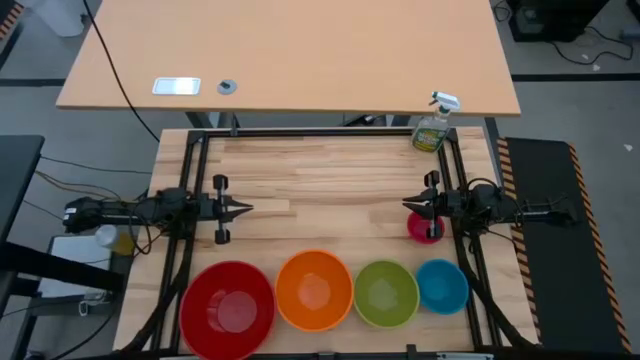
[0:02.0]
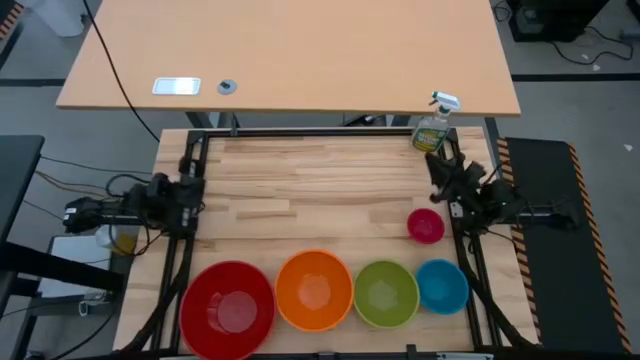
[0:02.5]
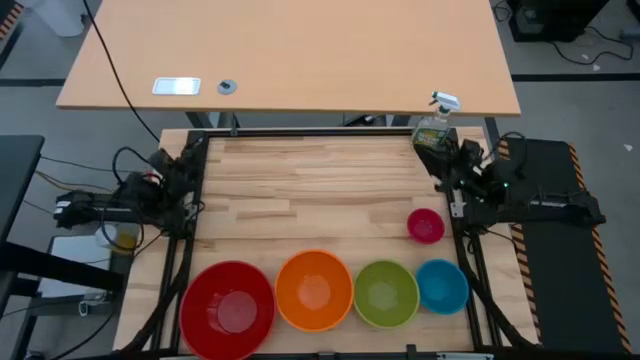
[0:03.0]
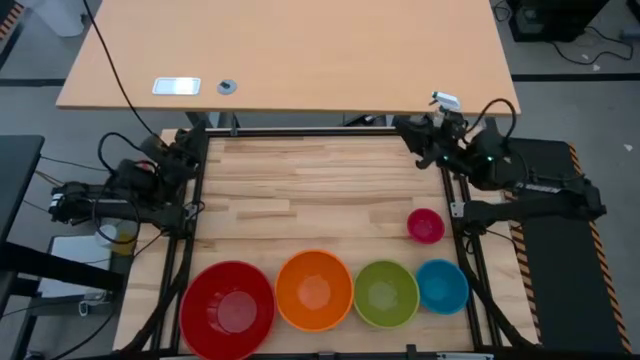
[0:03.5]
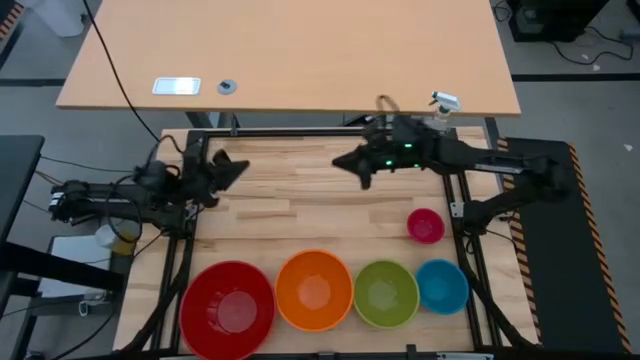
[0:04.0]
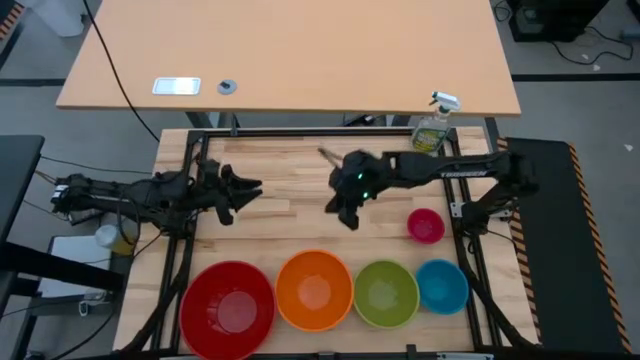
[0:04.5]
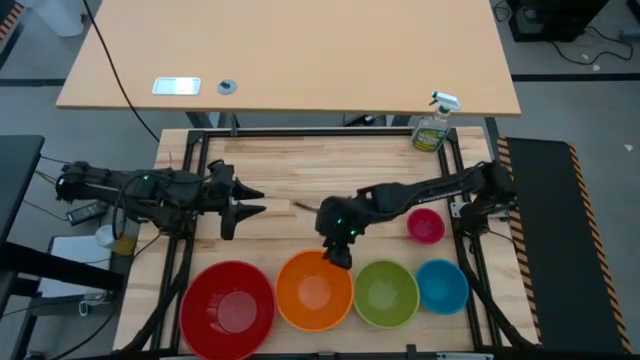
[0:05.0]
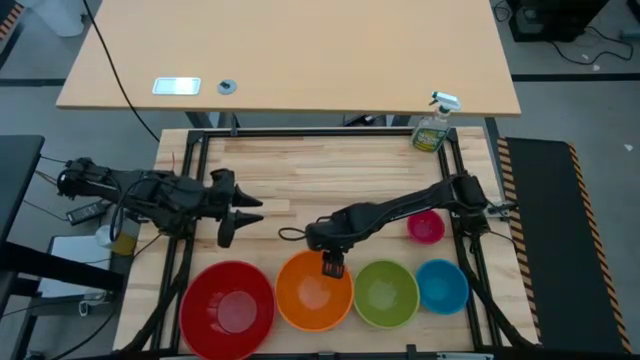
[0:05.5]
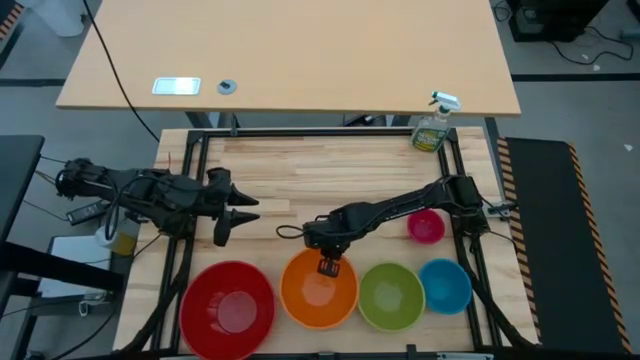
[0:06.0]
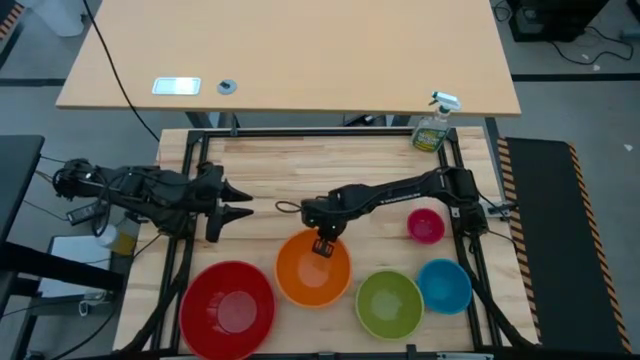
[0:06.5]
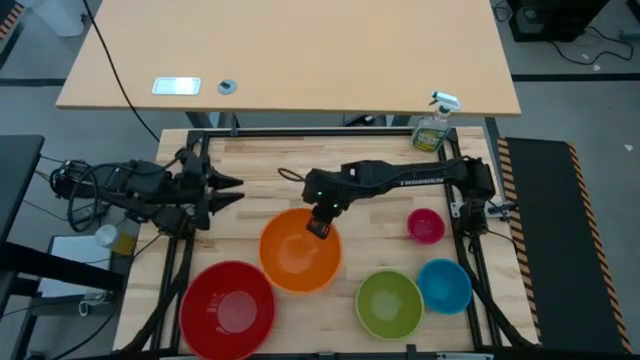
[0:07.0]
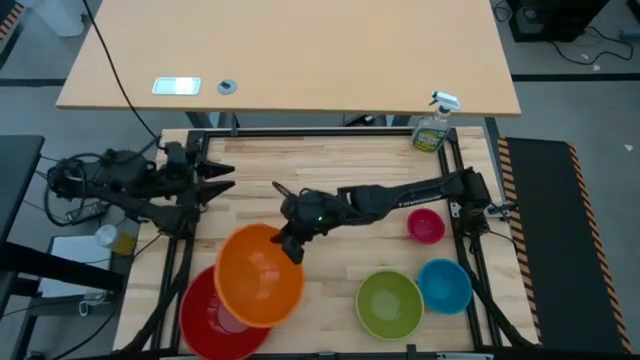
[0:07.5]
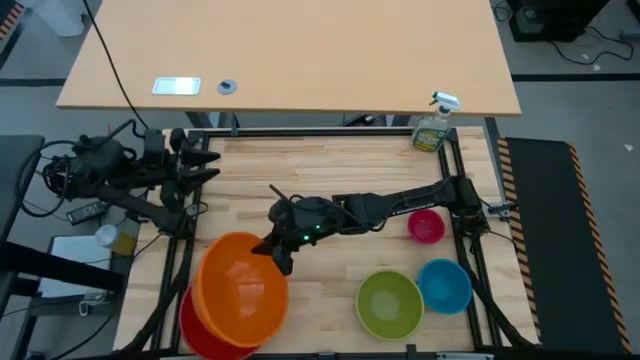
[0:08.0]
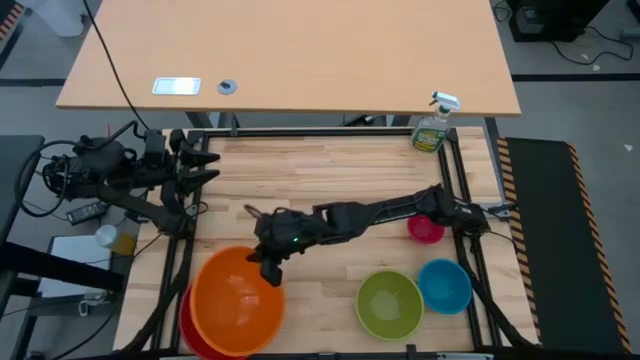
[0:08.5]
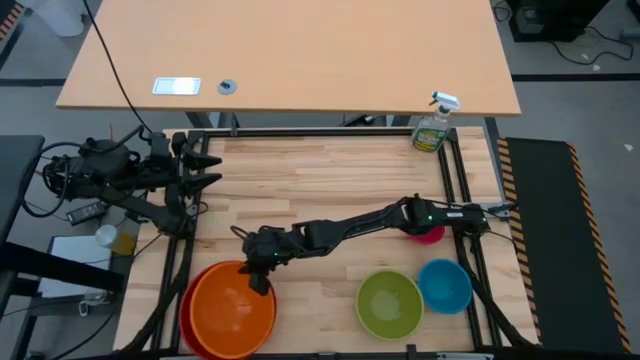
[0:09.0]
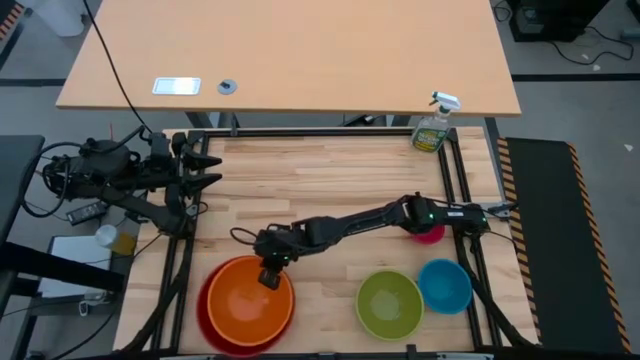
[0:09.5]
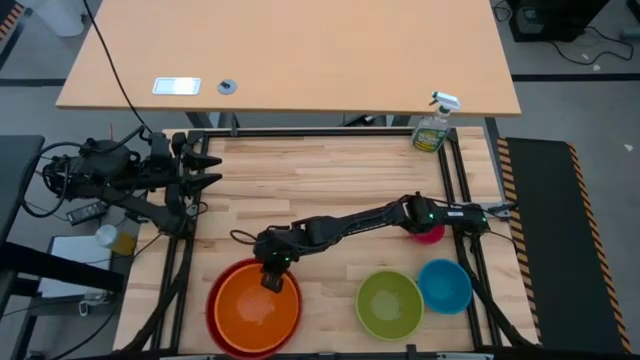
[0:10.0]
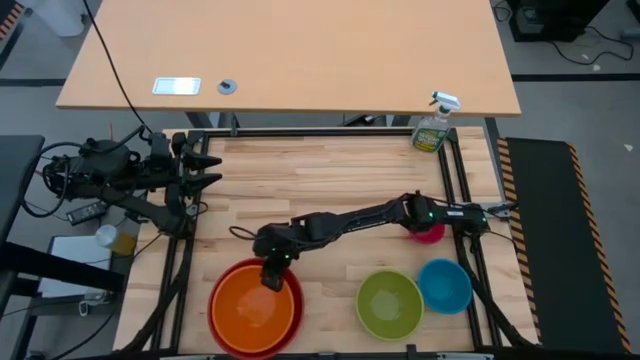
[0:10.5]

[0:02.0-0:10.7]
Stack the orange bowl on the red bowl

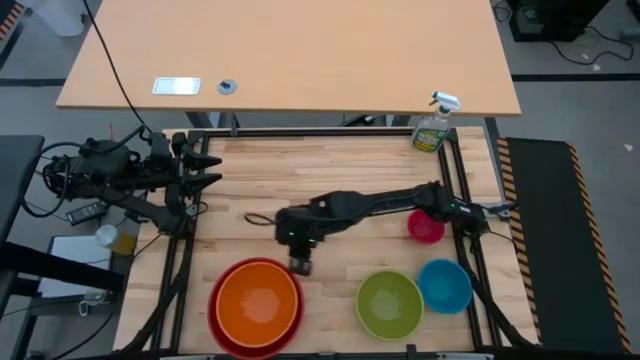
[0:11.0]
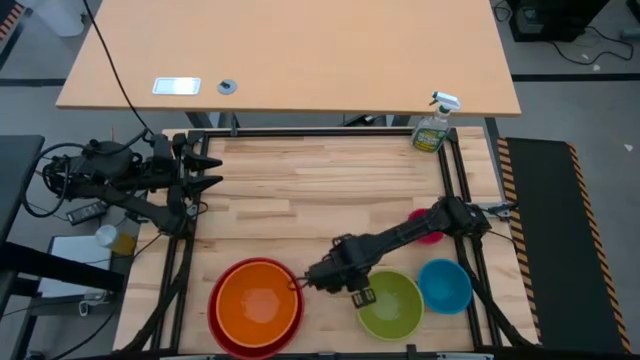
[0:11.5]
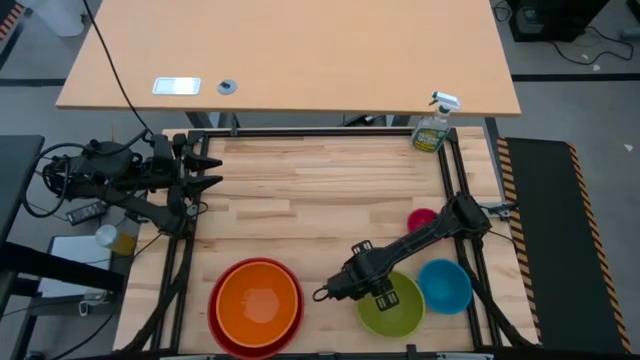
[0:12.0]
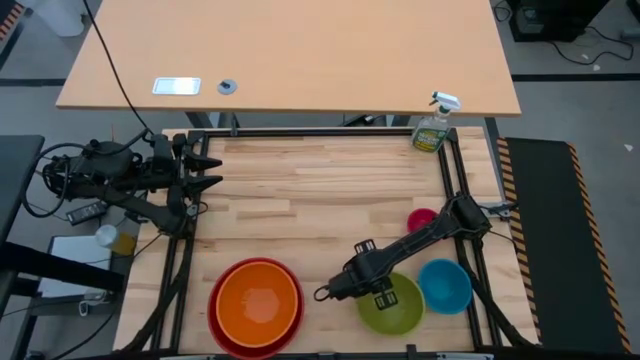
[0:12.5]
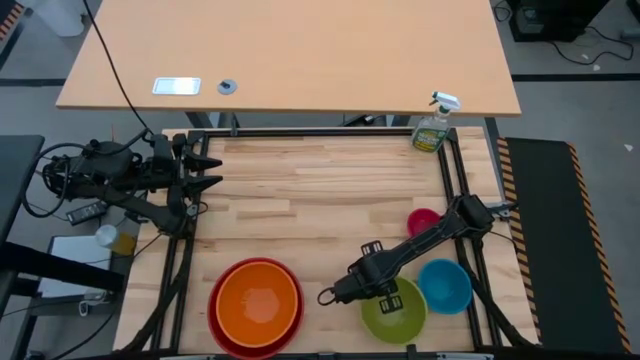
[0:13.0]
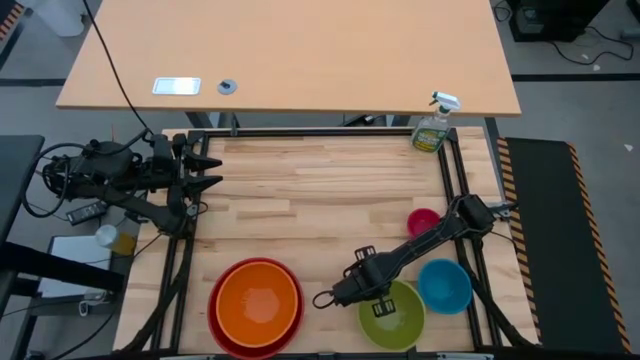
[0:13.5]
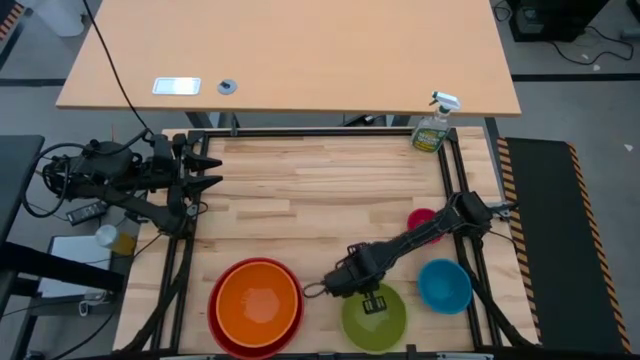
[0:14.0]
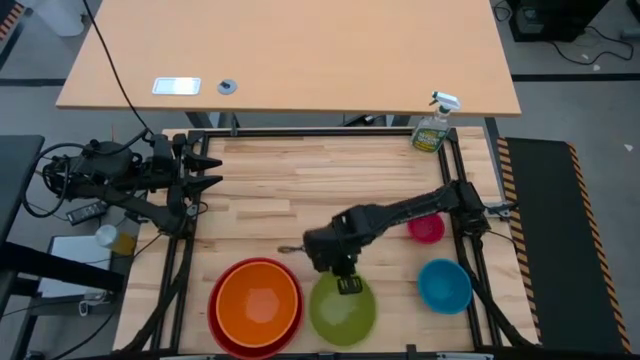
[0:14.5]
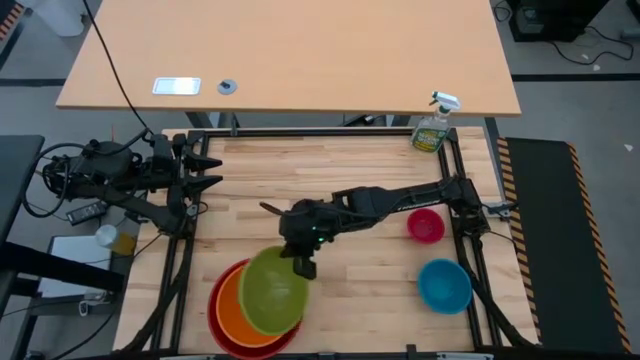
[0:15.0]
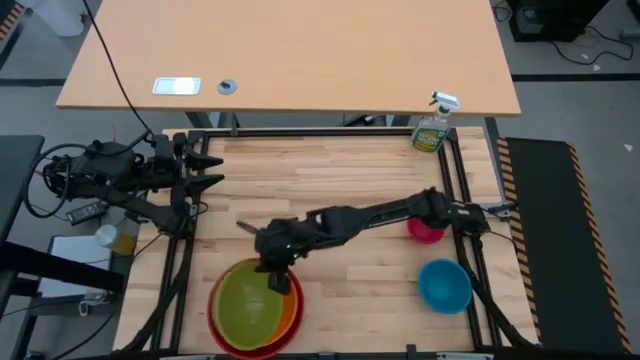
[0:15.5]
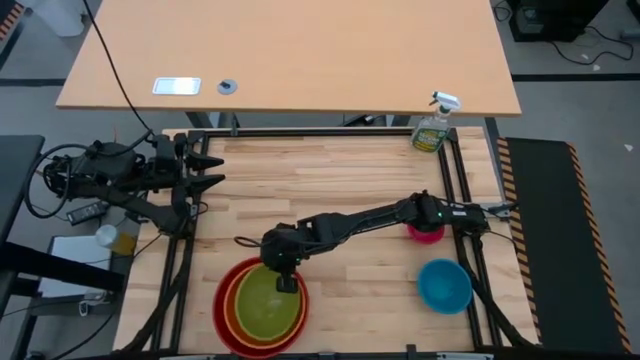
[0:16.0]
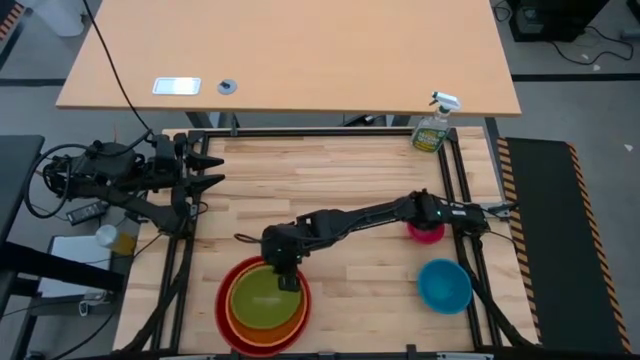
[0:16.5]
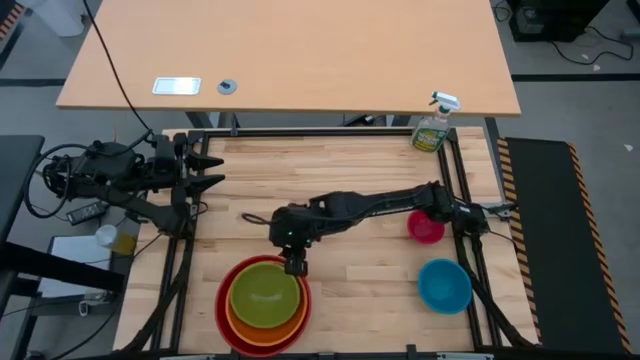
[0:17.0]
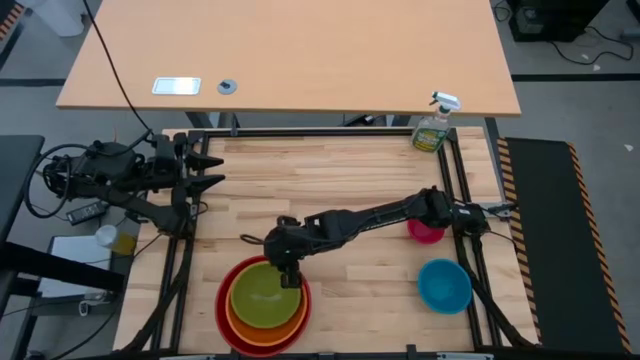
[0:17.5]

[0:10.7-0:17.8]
Stack the green bowl on the orange bowl

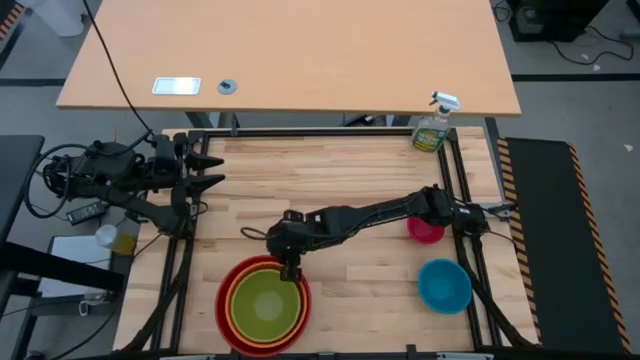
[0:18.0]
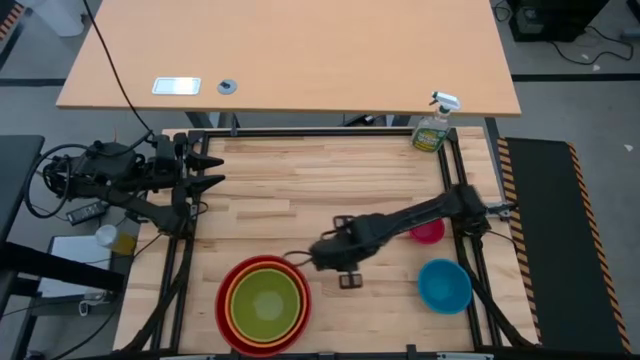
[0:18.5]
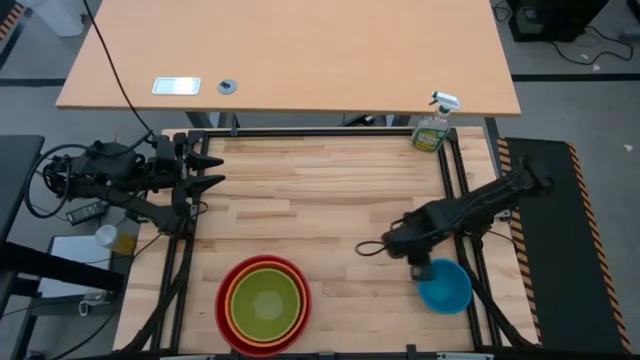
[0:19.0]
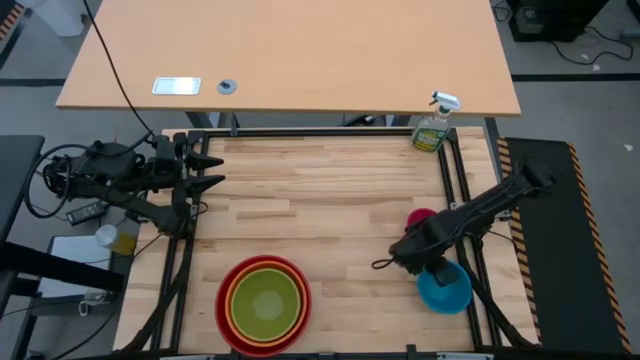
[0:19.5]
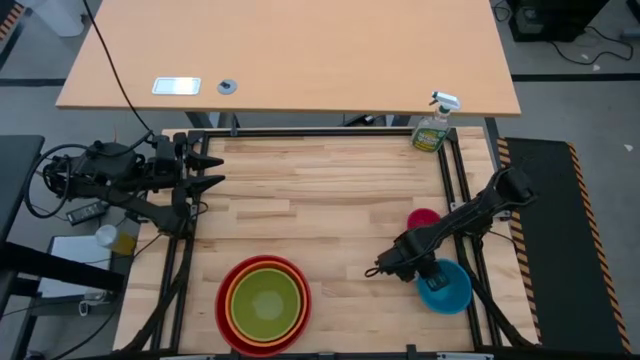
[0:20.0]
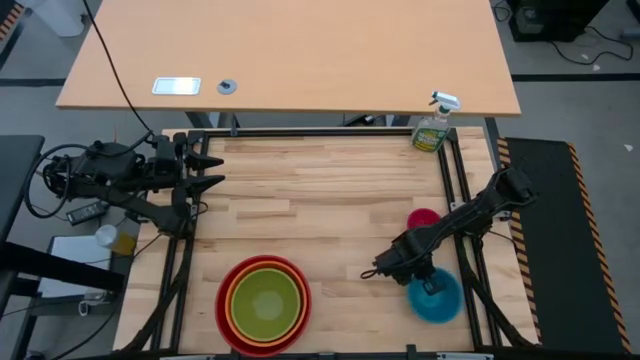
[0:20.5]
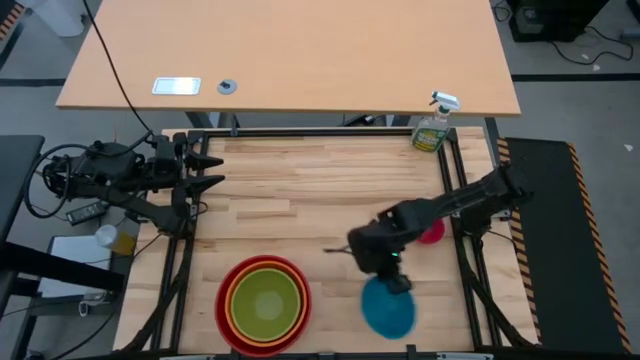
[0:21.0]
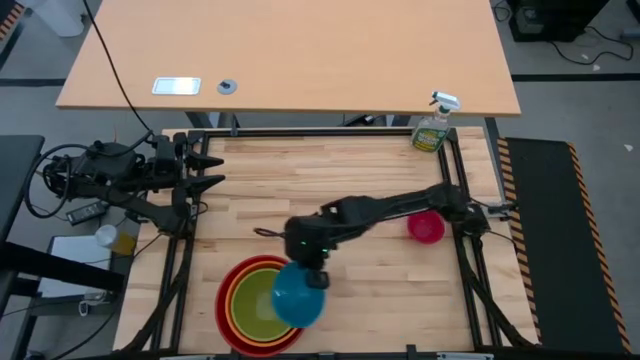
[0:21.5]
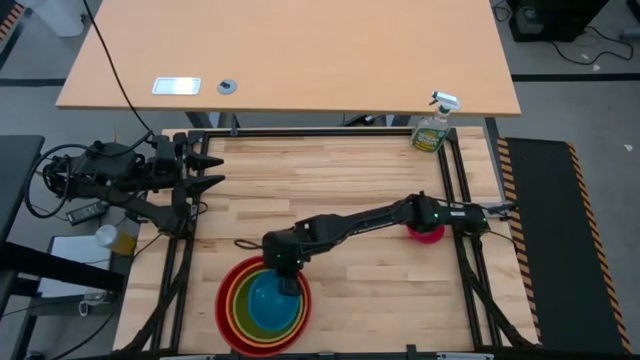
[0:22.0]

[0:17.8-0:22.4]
Stack the blue bowl on the green bowl
